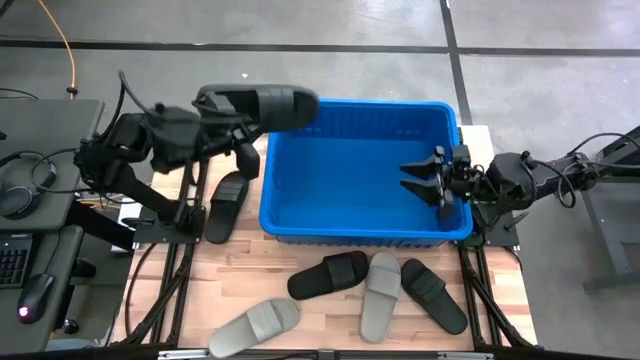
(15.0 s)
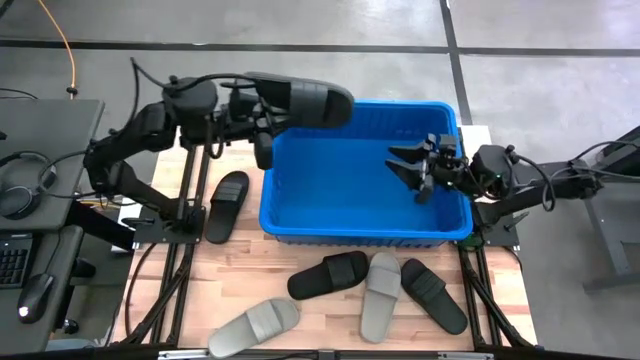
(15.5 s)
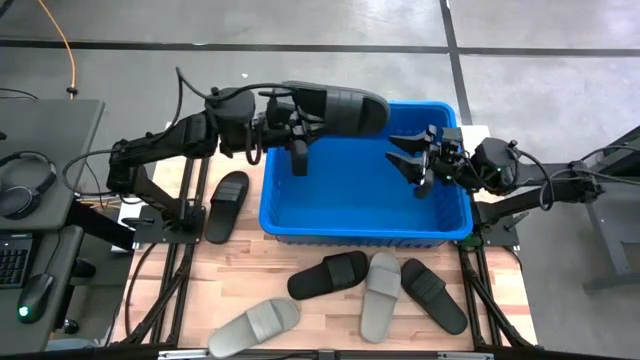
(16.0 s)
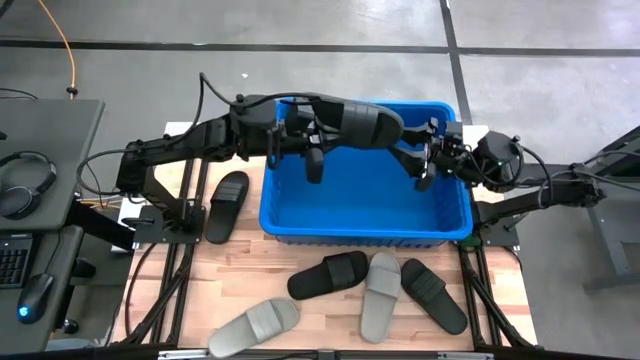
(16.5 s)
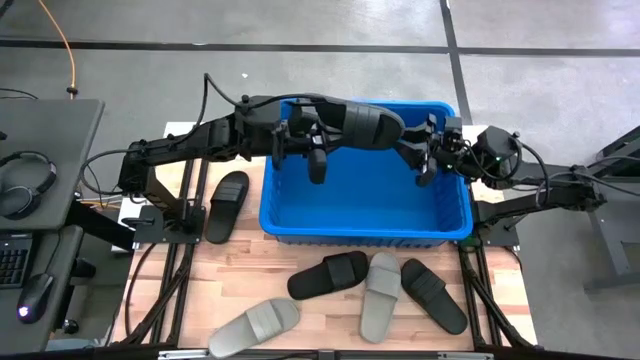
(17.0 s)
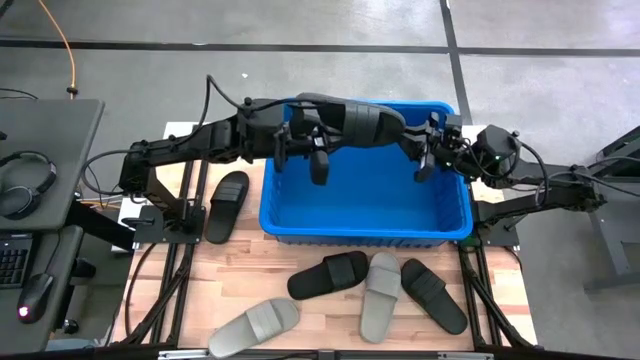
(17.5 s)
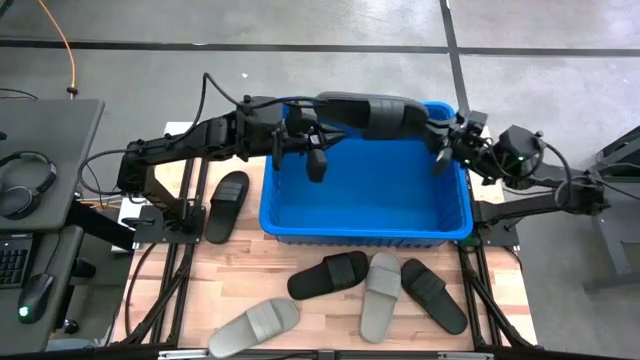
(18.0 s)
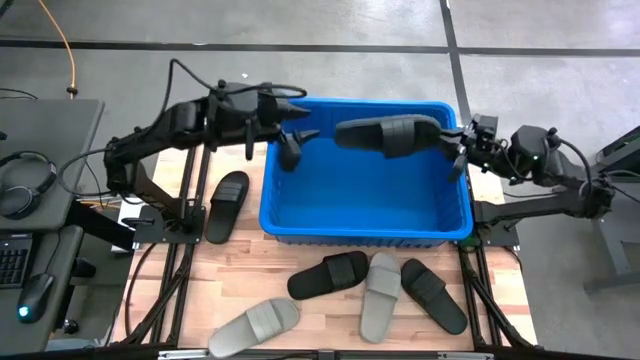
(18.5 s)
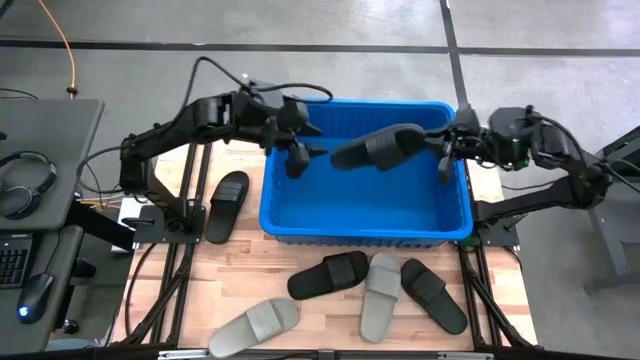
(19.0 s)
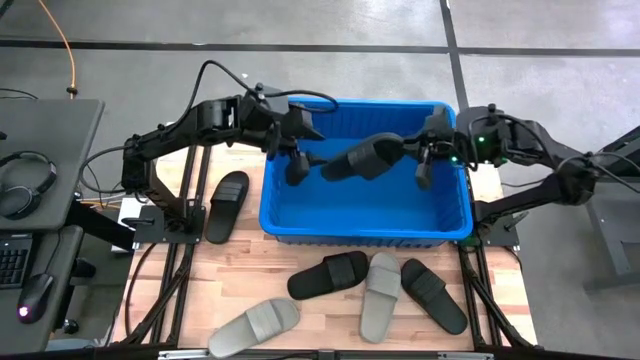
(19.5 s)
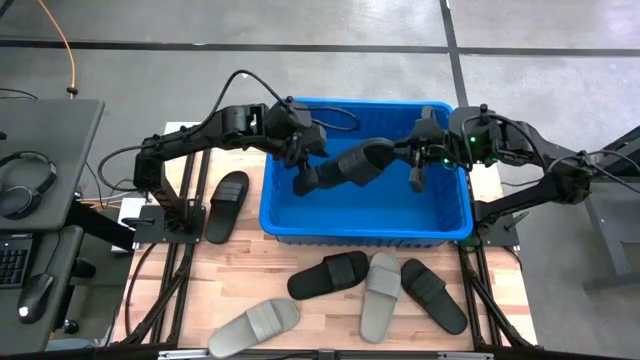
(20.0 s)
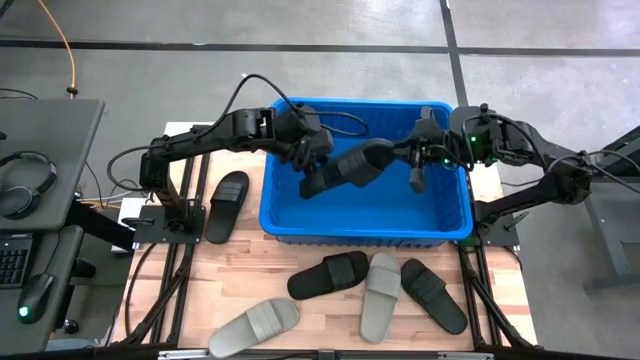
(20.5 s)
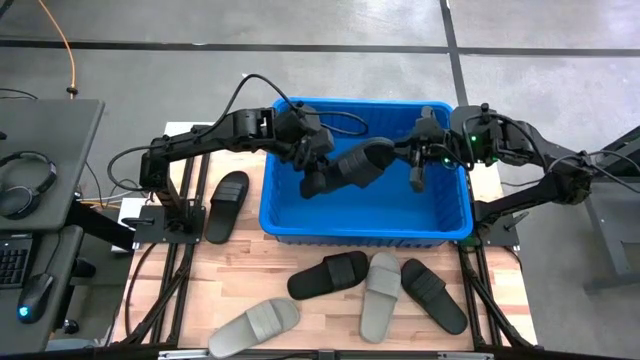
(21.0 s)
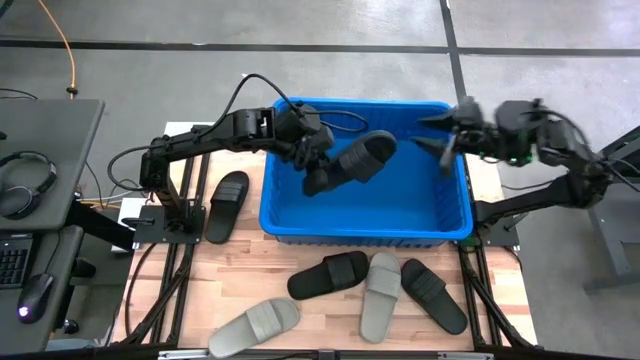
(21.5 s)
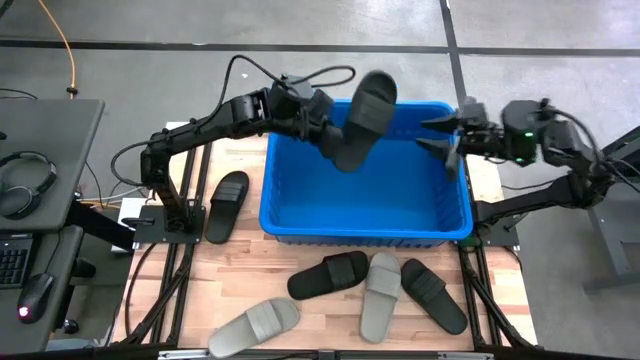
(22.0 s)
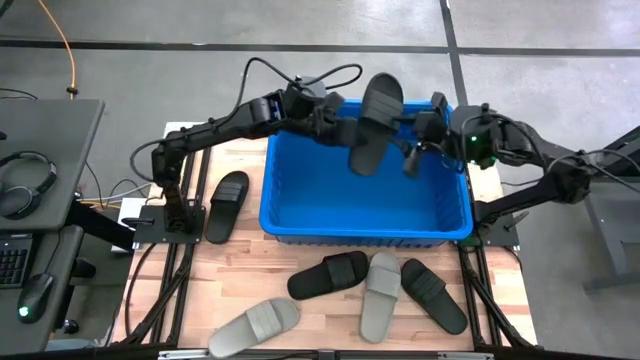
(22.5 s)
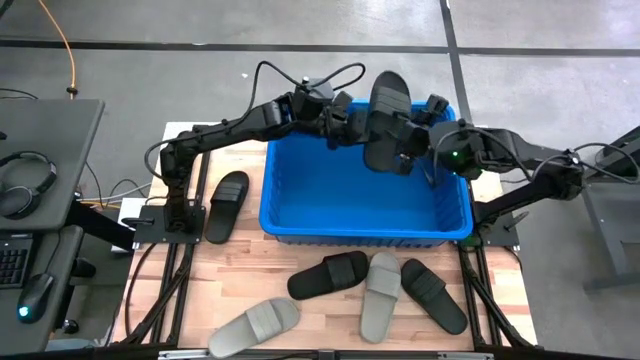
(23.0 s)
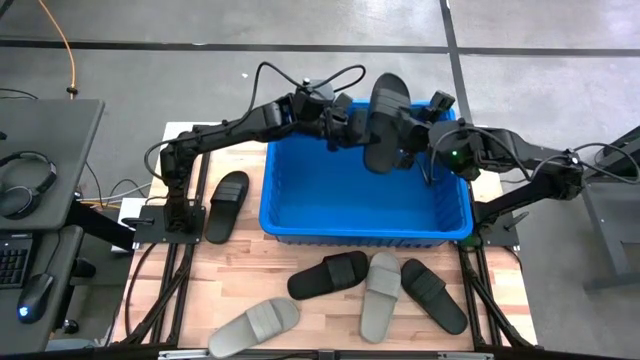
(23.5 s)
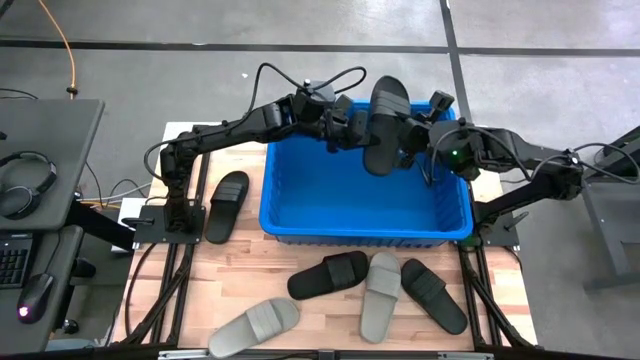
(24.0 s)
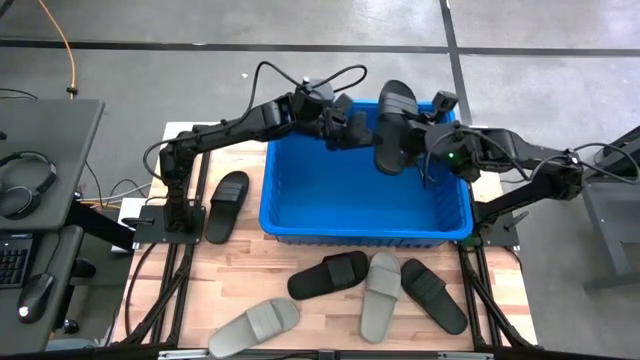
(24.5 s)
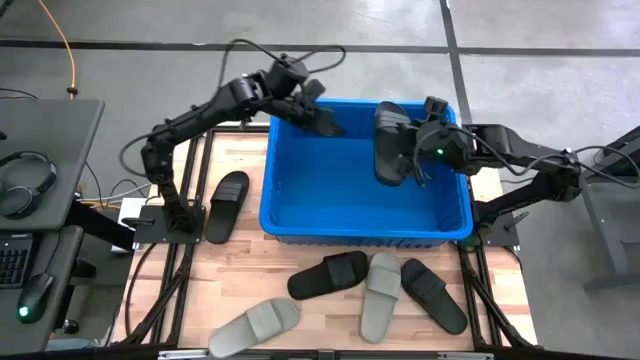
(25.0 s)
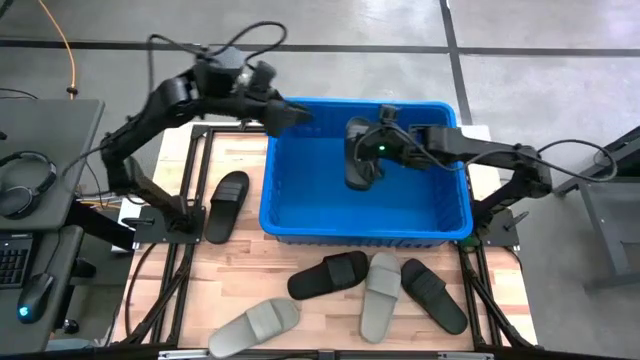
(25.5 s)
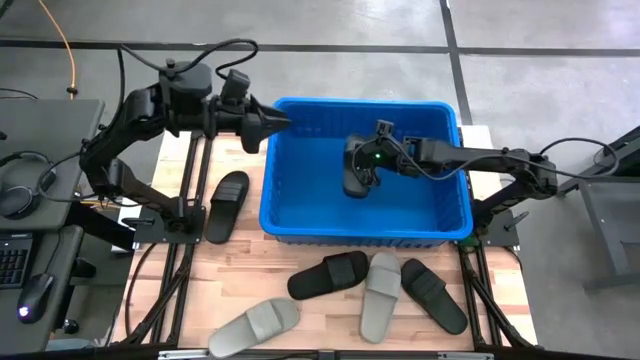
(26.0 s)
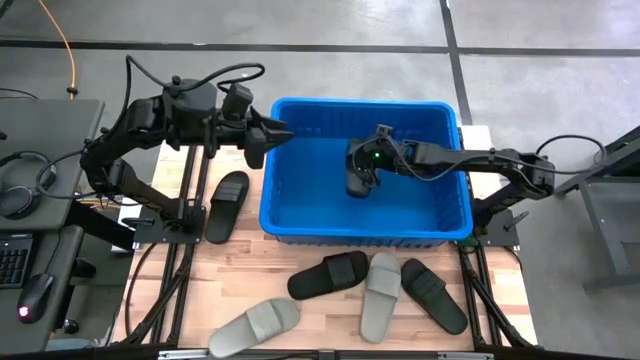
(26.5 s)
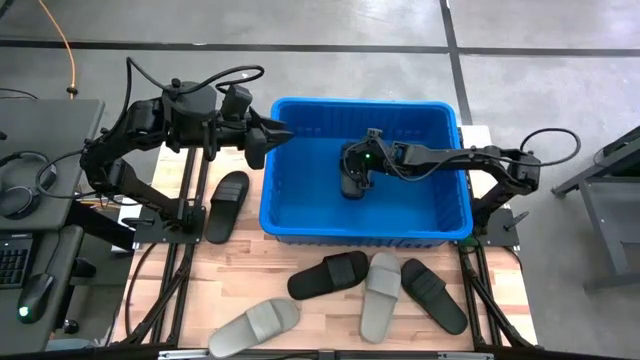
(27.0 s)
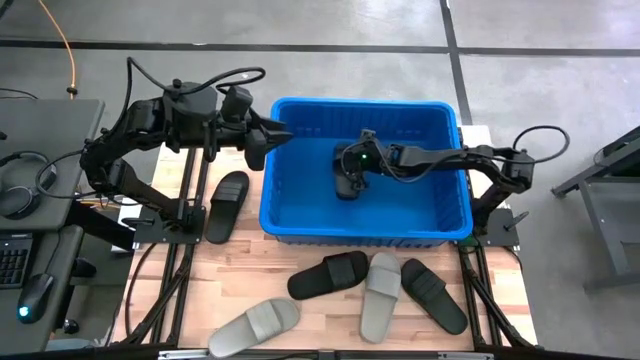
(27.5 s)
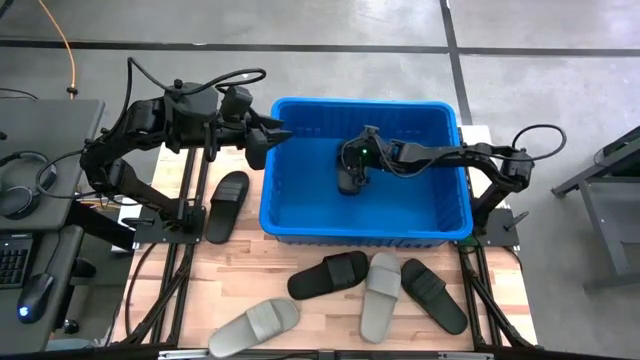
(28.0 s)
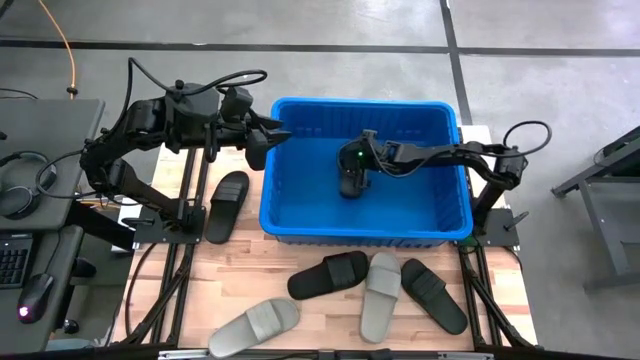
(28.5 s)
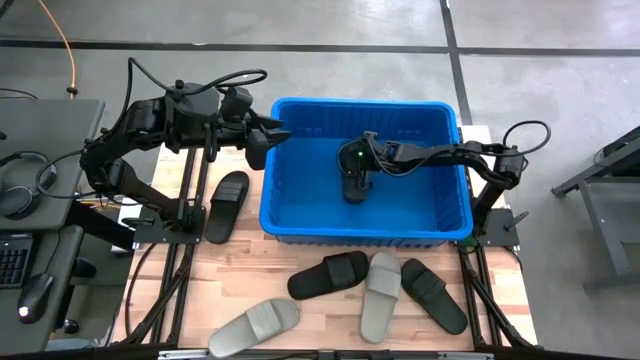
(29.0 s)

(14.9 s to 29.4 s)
Task: Pick and place slides into bin
Put the black slides into the blue bin

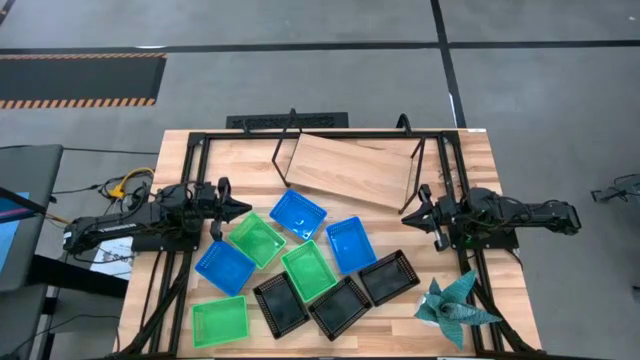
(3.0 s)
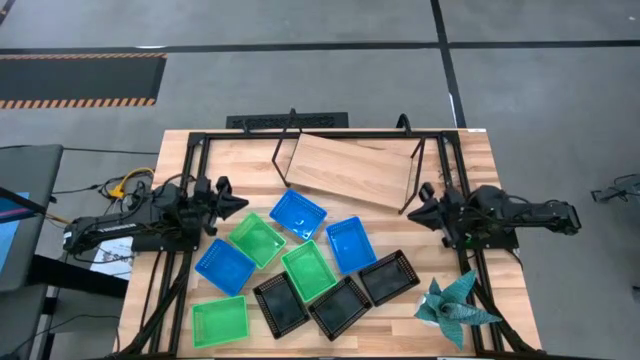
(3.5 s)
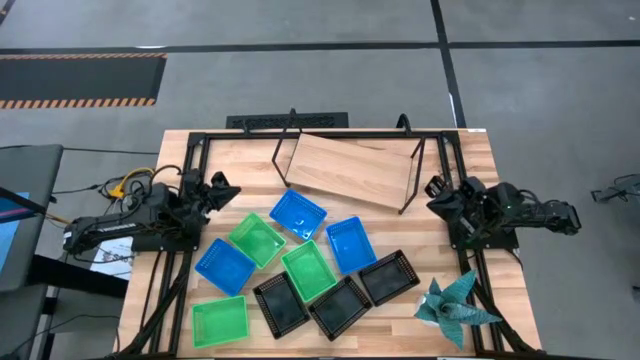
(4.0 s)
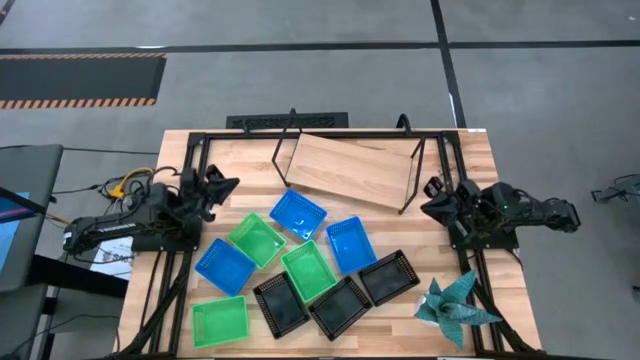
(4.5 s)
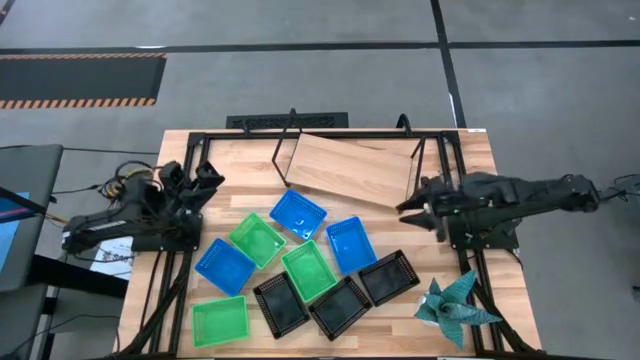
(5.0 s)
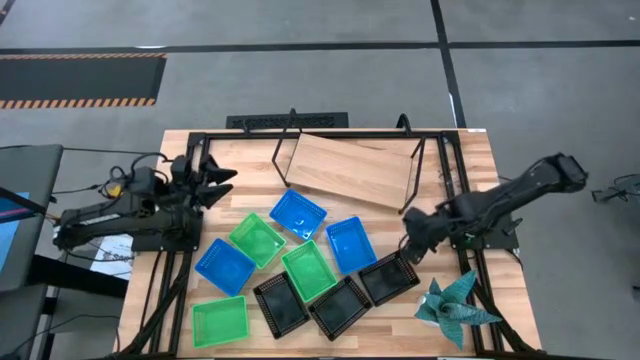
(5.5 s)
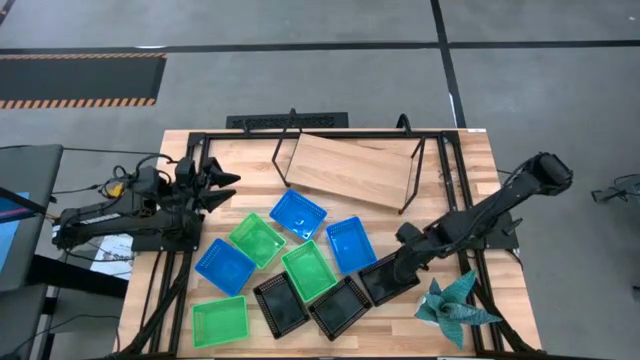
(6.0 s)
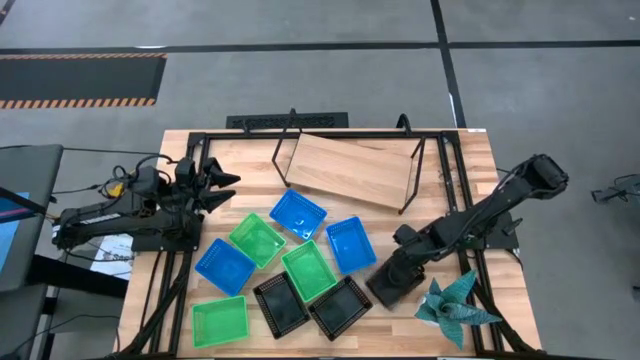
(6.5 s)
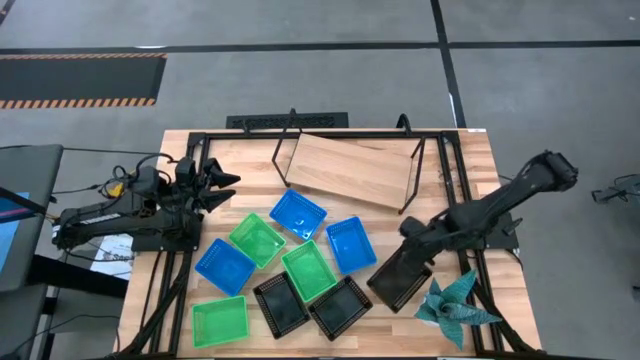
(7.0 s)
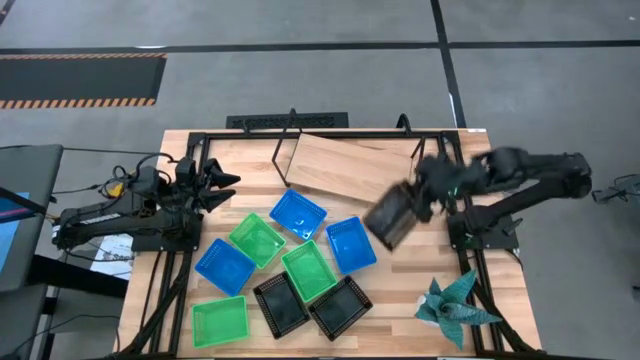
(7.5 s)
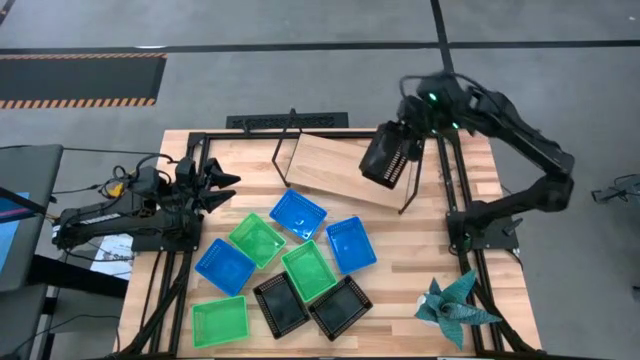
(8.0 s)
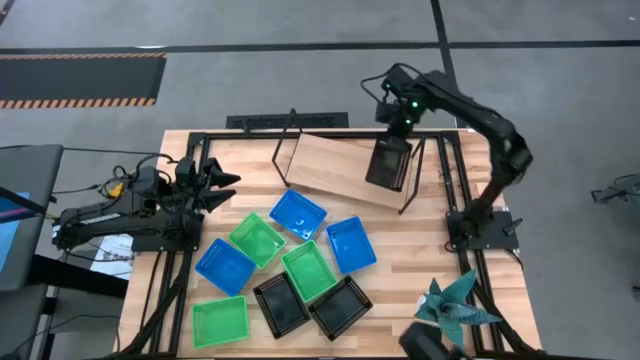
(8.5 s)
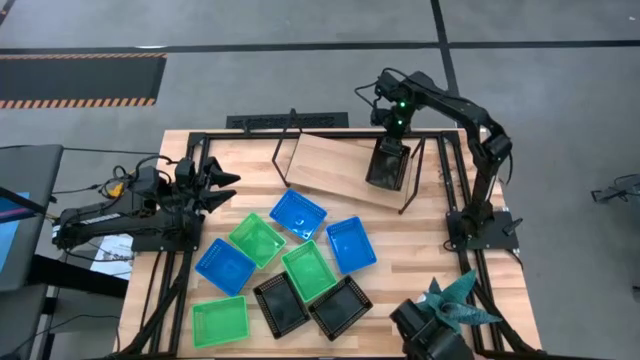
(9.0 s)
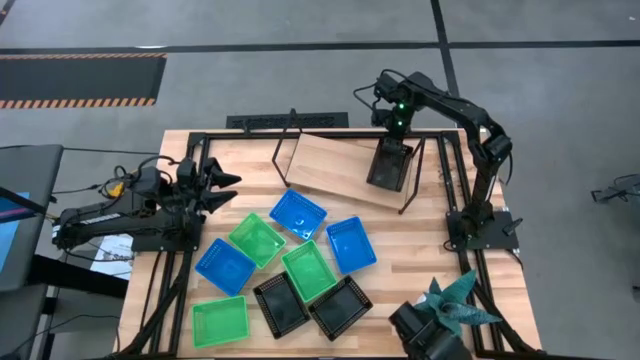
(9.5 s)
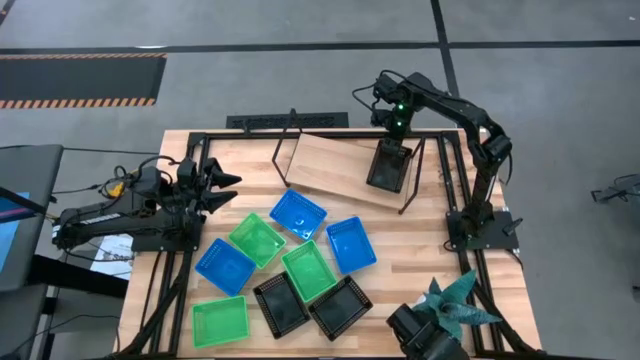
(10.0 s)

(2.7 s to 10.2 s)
Task: Stack baskets on shelf by color
Put the right black bin on the shelf
